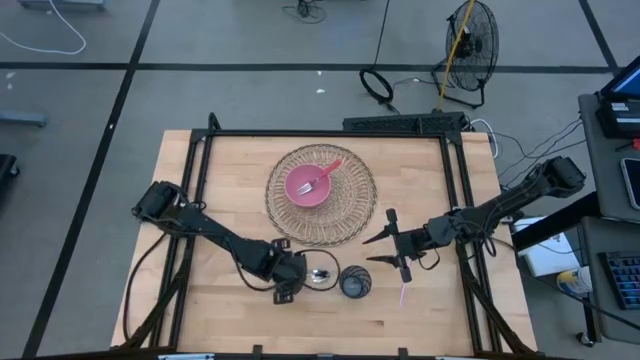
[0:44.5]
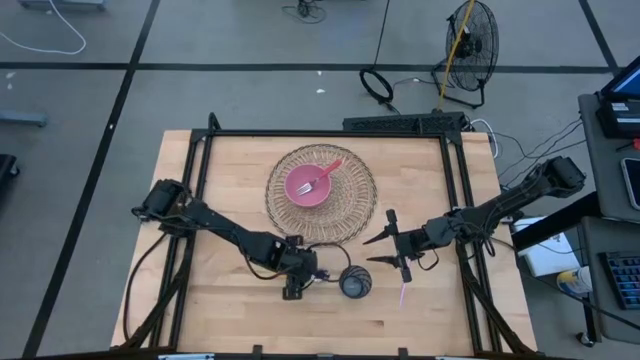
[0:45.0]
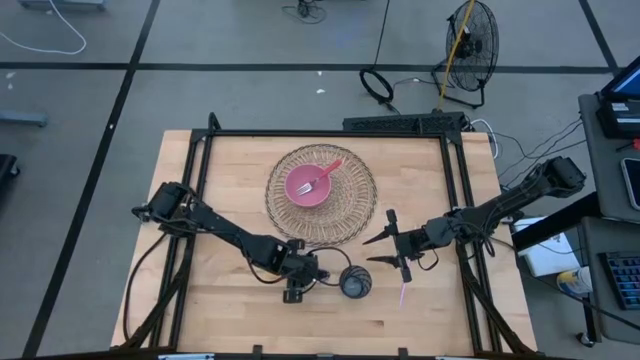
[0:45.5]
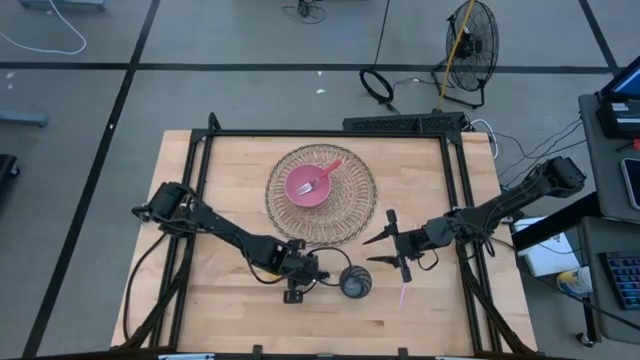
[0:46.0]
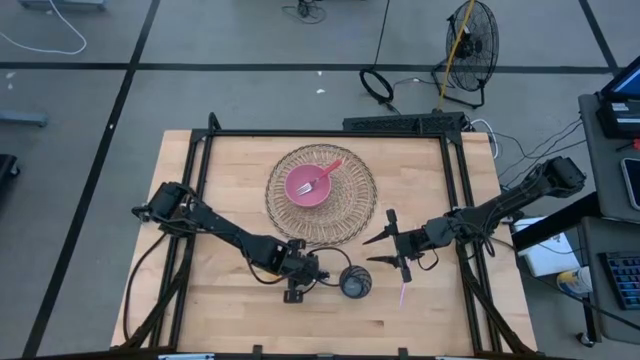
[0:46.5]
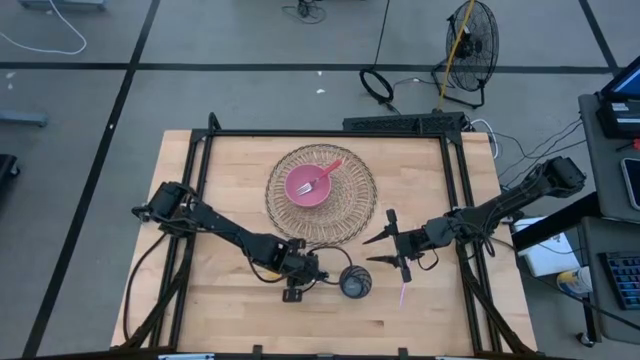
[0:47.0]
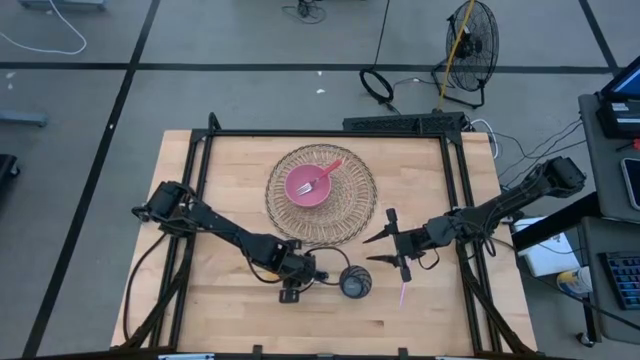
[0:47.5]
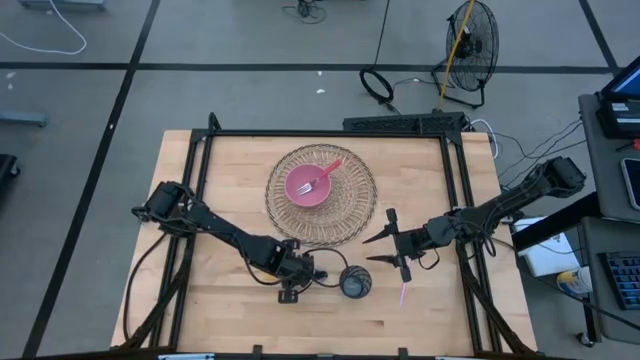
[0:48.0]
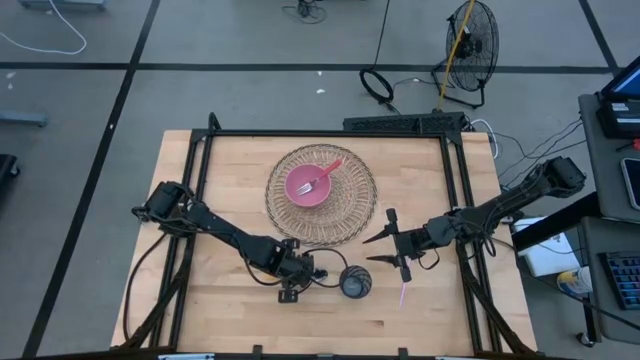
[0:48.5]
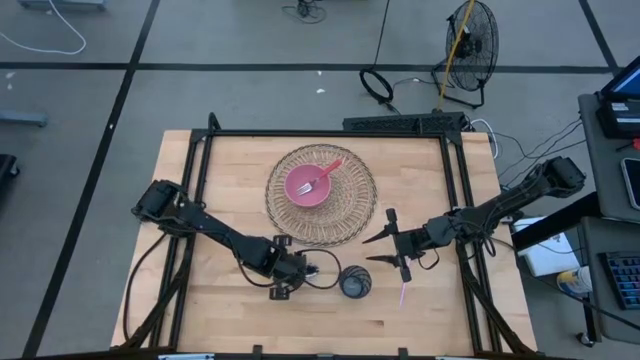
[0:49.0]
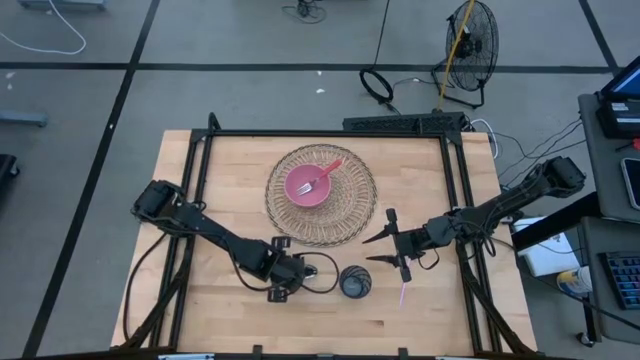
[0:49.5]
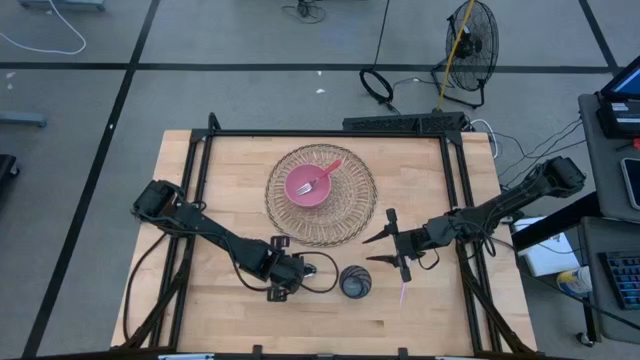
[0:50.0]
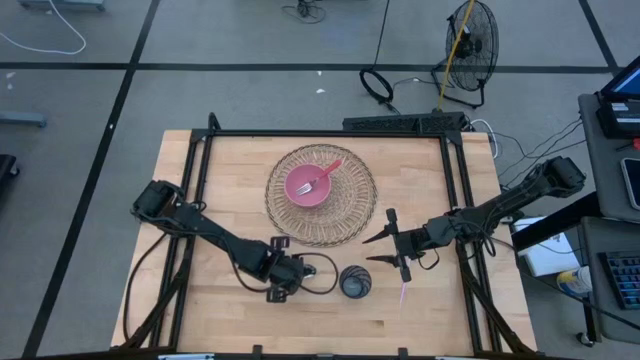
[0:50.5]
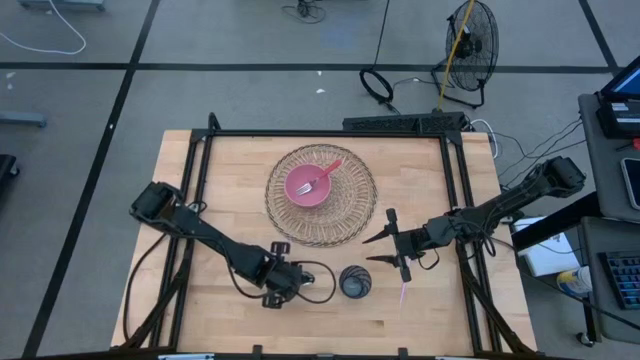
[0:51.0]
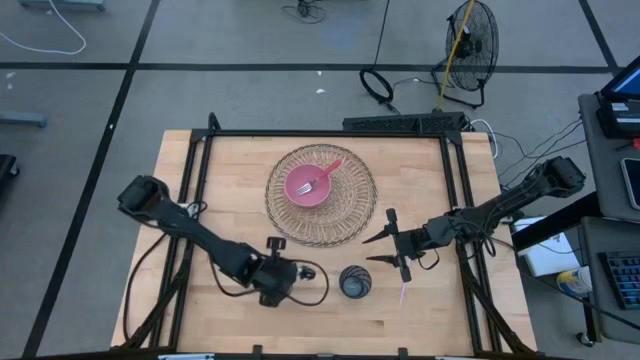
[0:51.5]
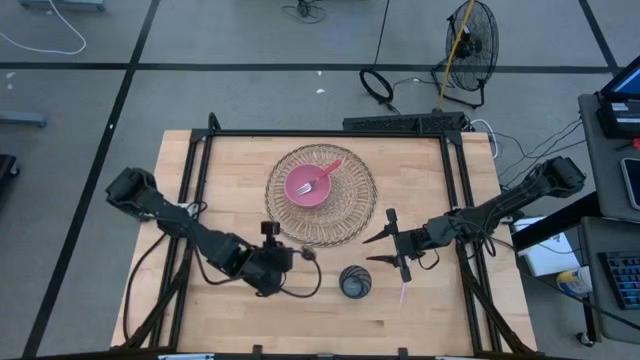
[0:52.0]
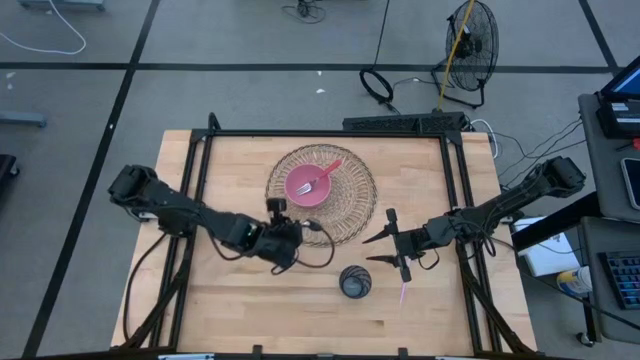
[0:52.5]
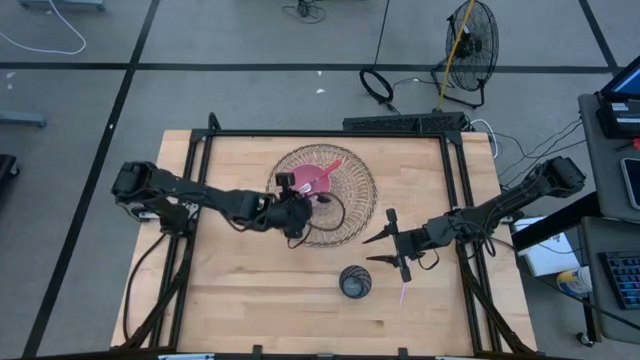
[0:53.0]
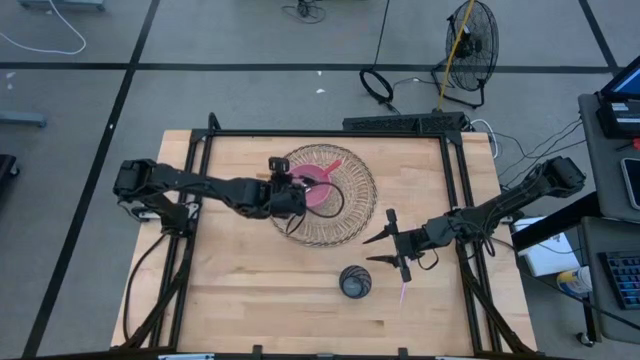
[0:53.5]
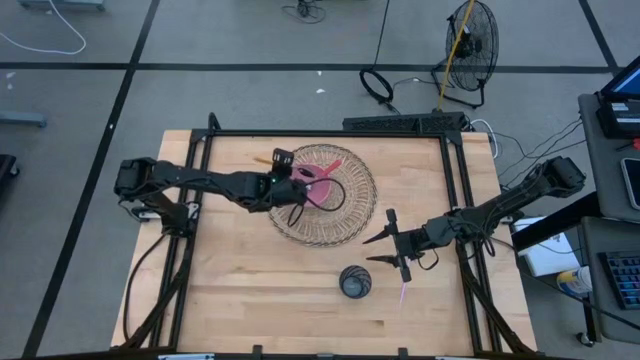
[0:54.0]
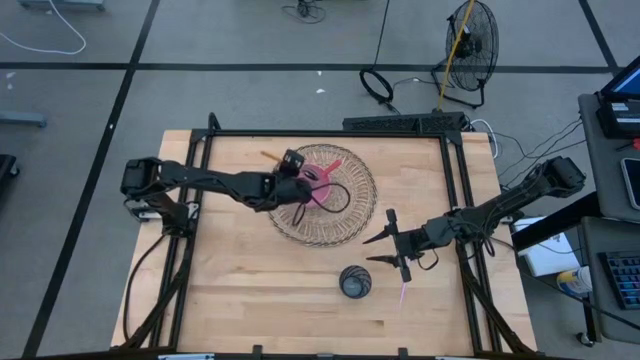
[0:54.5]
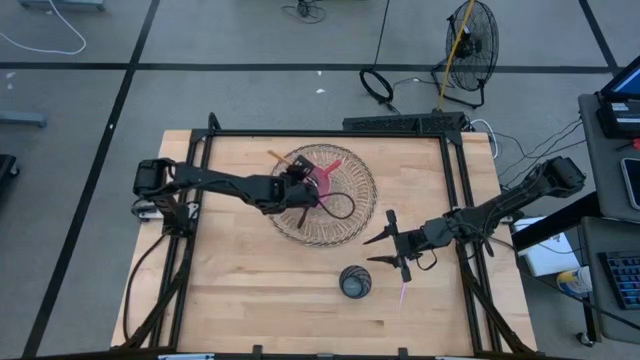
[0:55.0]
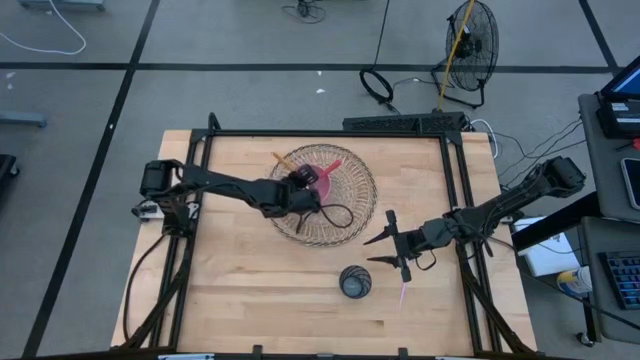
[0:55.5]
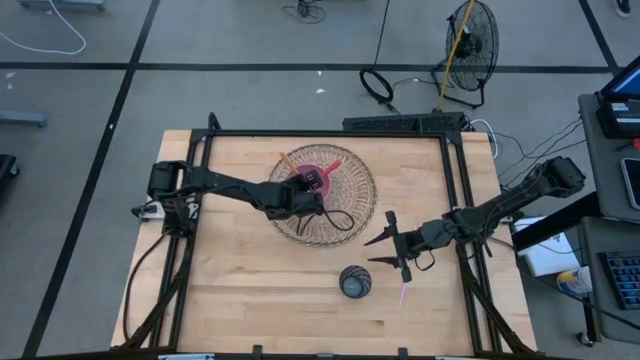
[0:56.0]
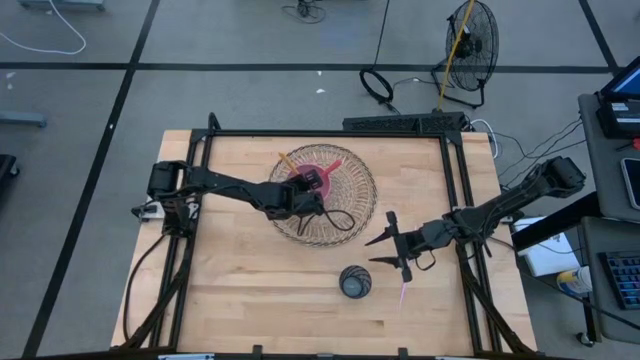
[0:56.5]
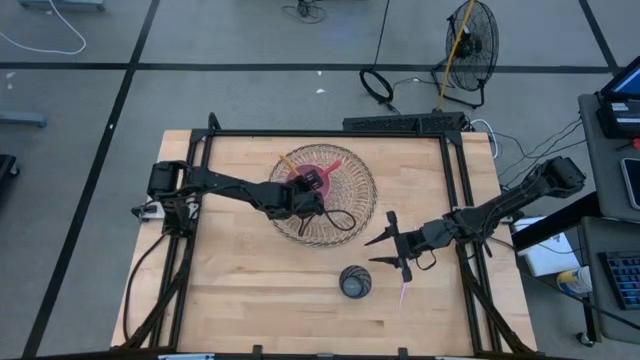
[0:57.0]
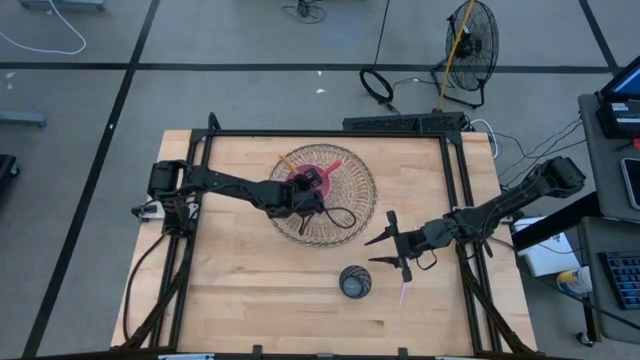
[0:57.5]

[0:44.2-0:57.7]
Task: Pick & Place Utensil
Put the orange spoon into the pink bowl on the woven mat

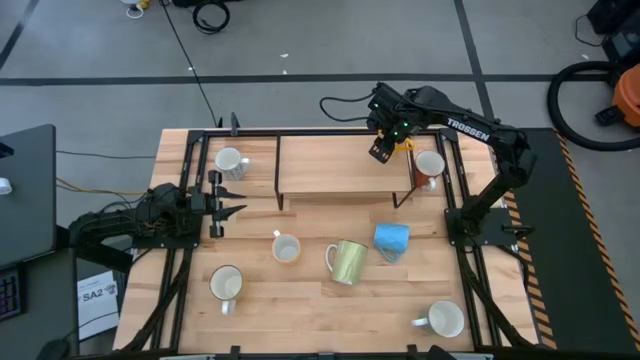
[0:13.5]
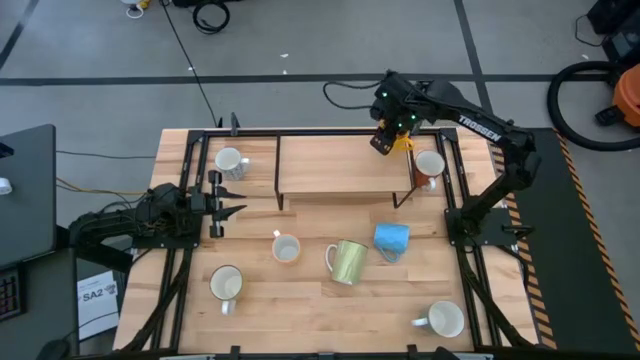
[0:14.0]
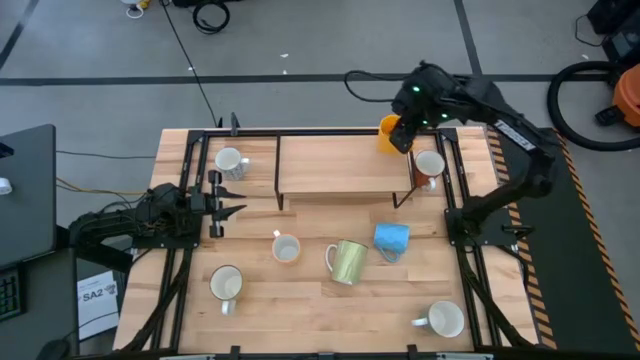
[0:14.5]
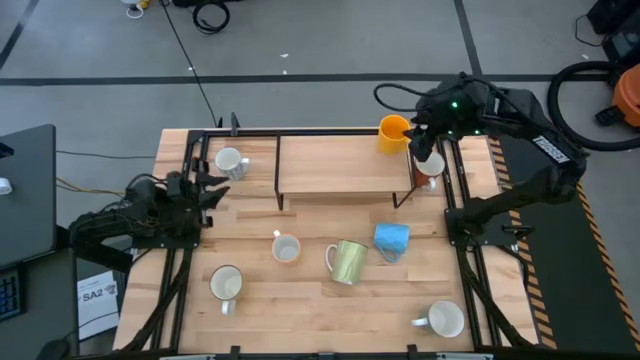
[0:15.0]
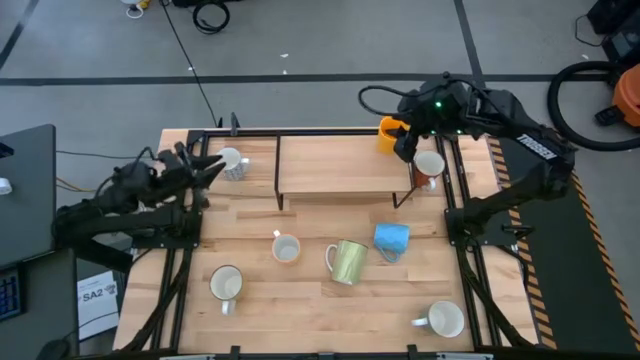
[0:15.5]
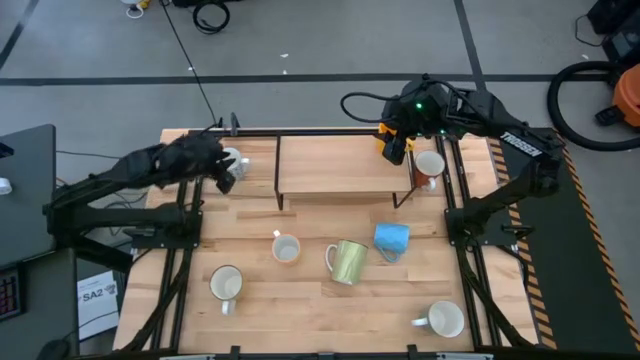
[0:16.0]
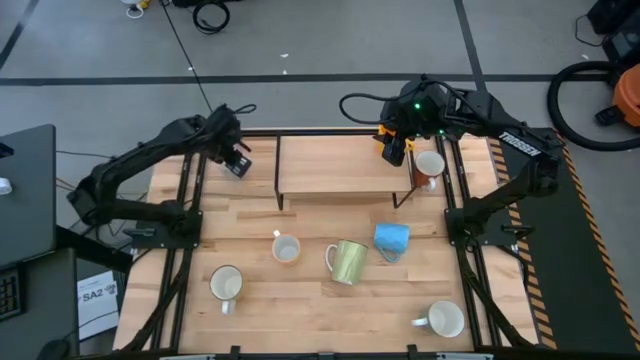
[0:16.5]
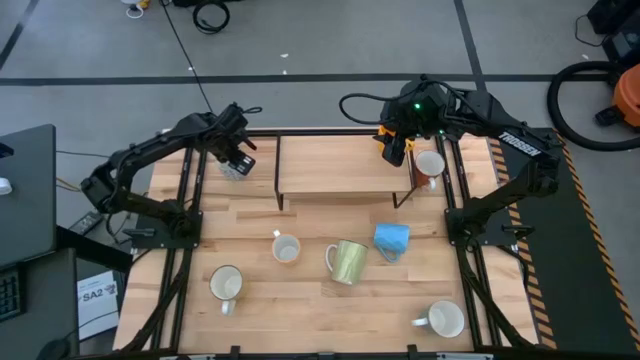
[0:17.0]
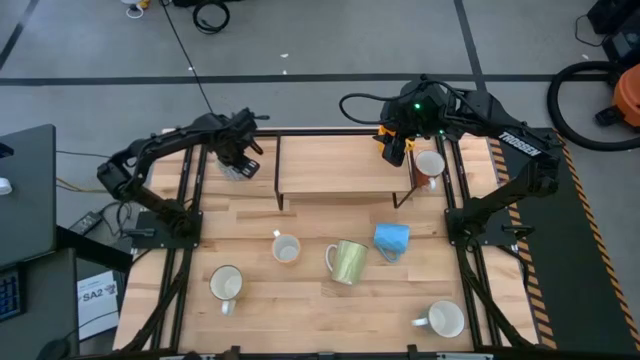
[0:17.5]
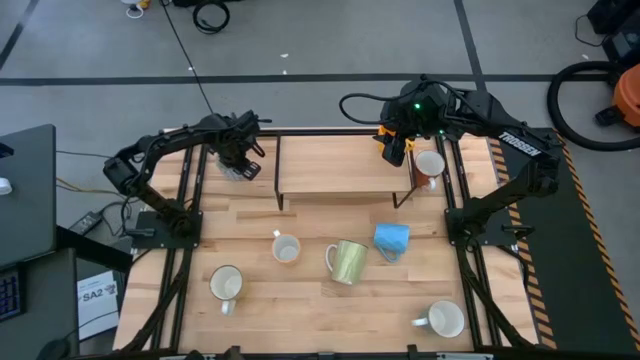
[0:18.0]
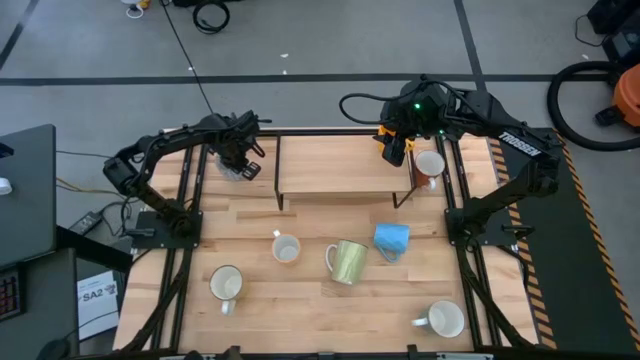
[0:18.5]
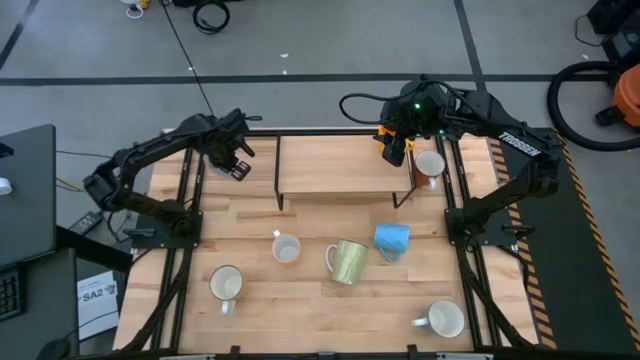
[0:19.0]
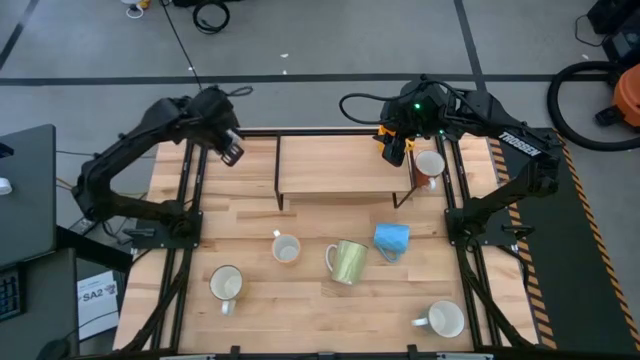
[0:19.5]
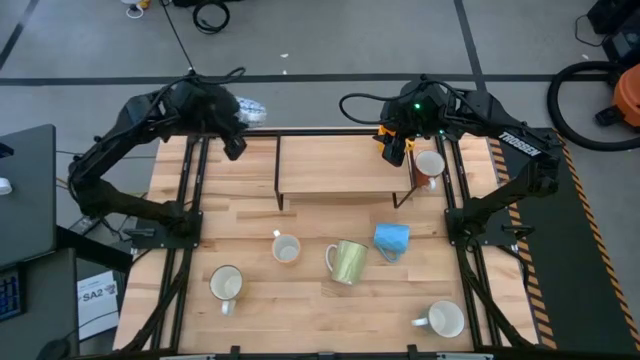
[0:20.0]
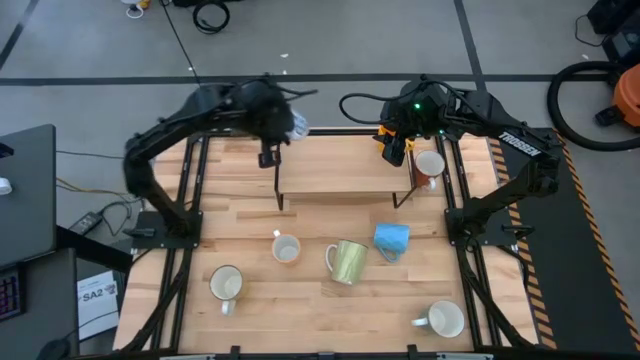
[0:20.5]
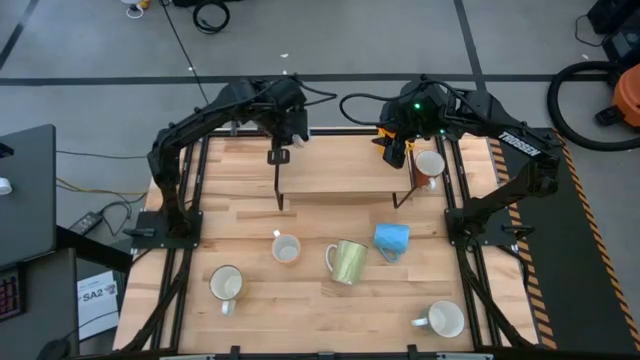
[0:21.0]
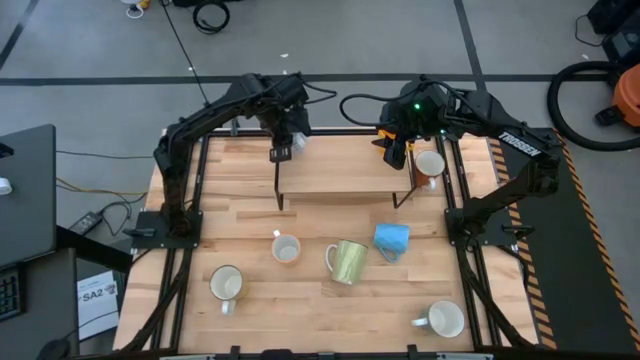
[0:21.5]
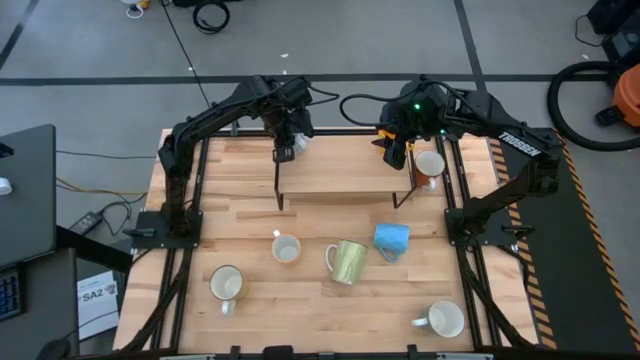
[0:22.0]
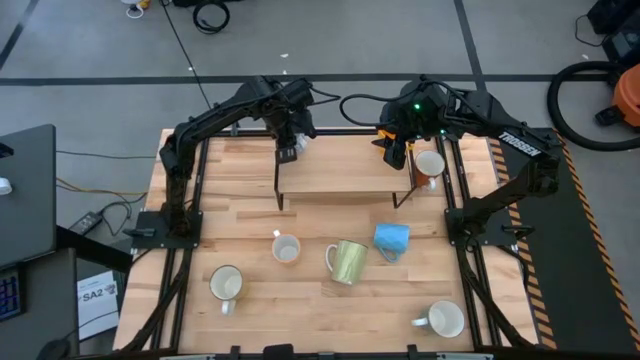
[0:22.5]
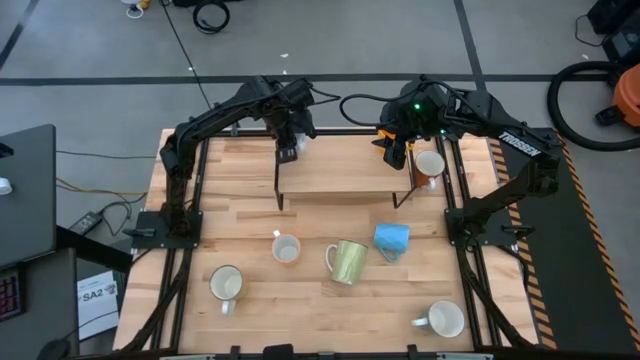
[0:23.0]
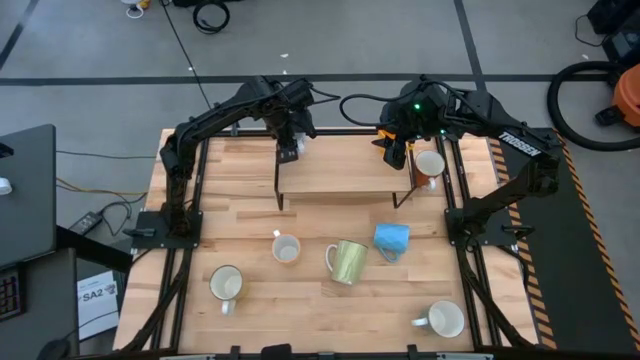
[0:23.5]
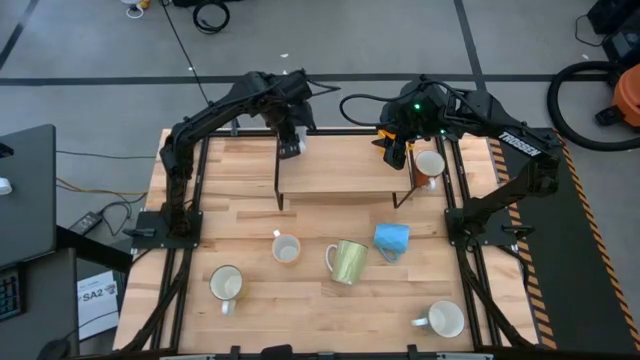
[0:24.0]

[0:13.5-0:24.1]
Task: Place coffee mugs
Put the blue patterned mug on the shelf
